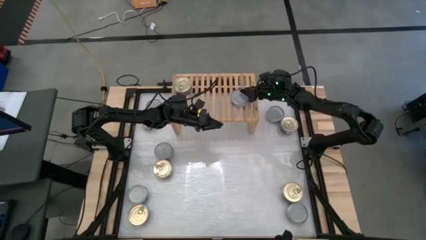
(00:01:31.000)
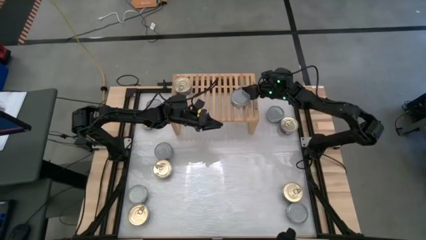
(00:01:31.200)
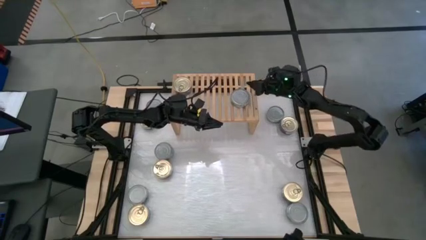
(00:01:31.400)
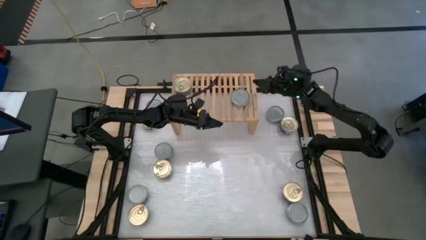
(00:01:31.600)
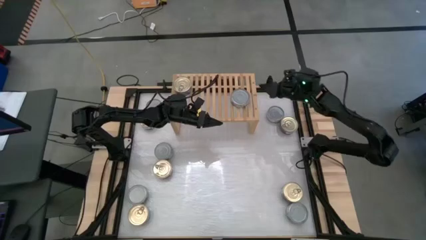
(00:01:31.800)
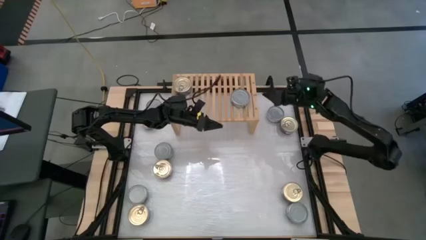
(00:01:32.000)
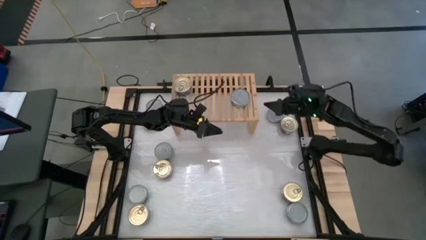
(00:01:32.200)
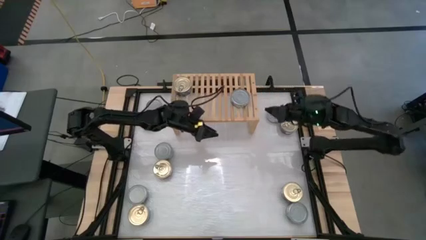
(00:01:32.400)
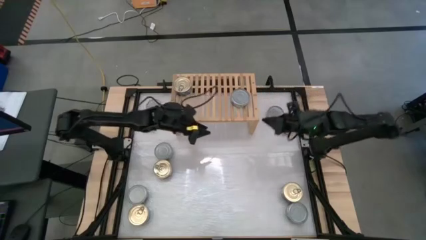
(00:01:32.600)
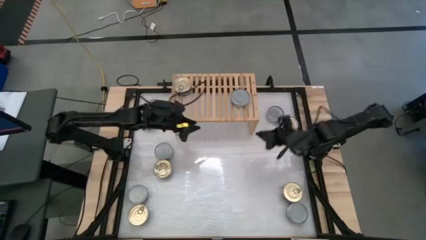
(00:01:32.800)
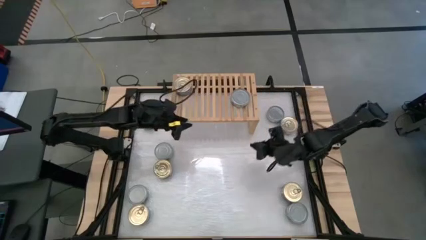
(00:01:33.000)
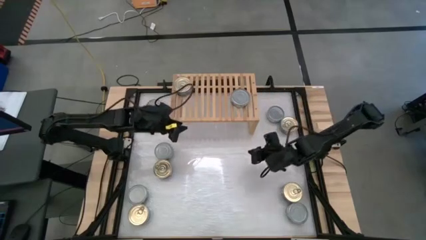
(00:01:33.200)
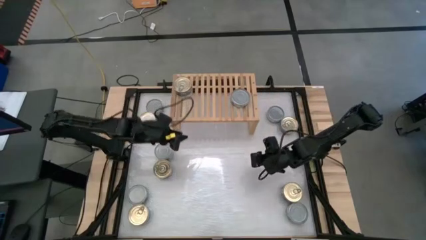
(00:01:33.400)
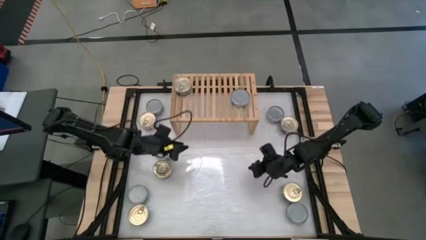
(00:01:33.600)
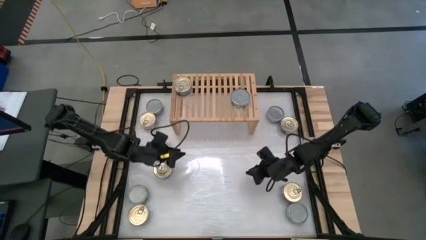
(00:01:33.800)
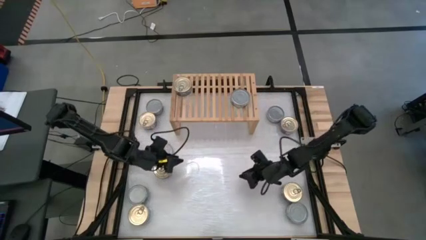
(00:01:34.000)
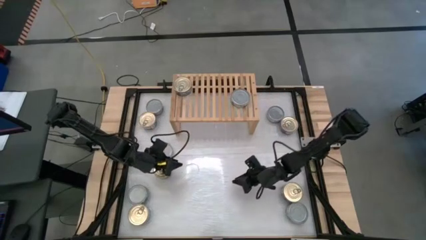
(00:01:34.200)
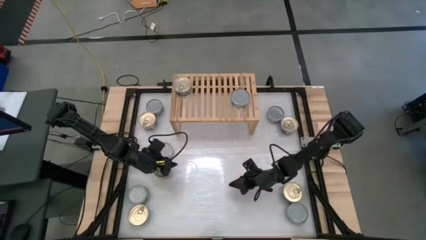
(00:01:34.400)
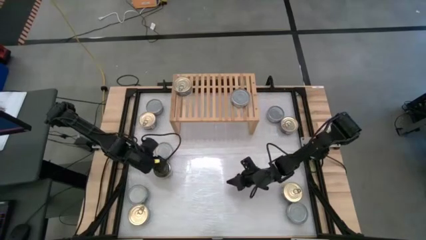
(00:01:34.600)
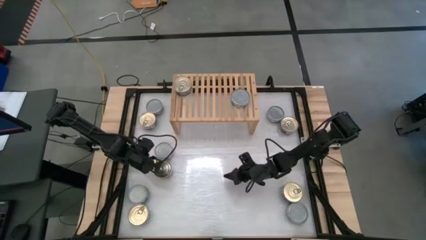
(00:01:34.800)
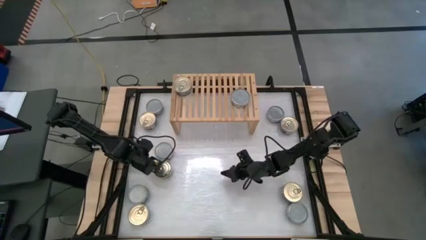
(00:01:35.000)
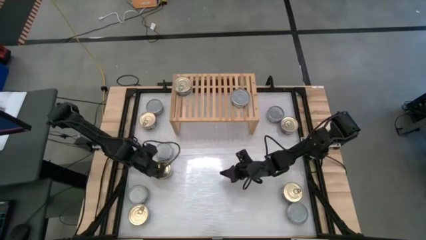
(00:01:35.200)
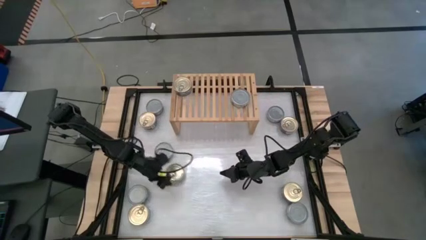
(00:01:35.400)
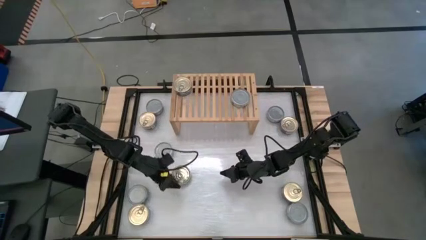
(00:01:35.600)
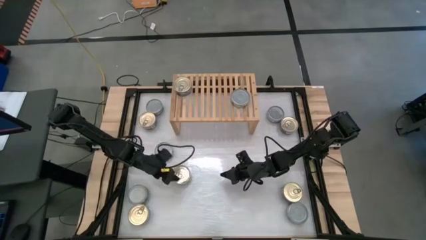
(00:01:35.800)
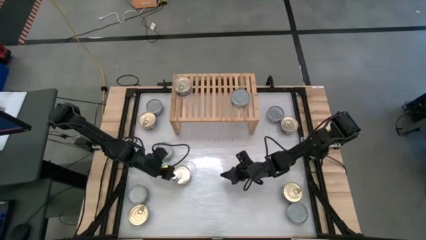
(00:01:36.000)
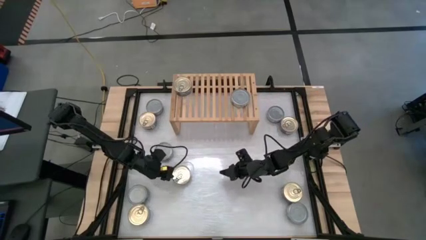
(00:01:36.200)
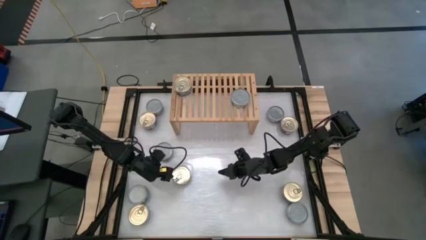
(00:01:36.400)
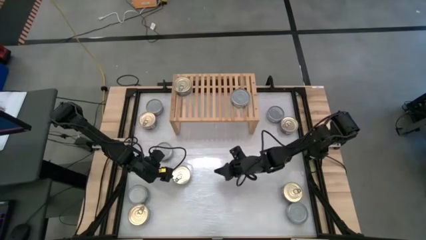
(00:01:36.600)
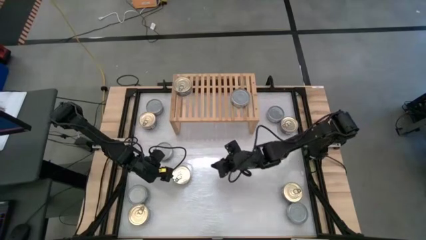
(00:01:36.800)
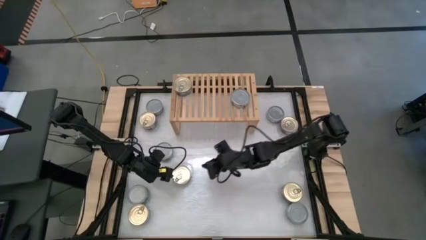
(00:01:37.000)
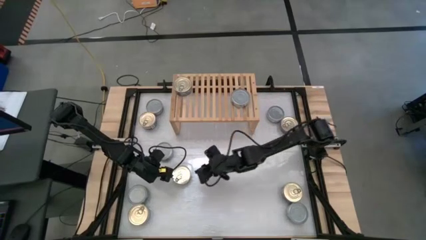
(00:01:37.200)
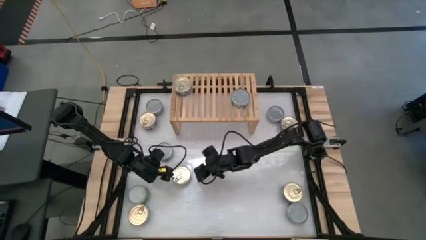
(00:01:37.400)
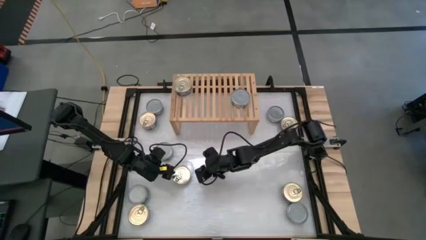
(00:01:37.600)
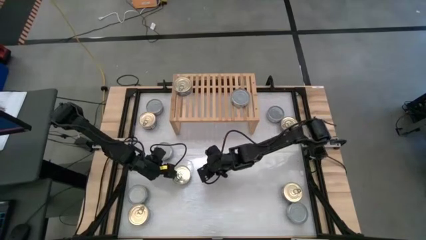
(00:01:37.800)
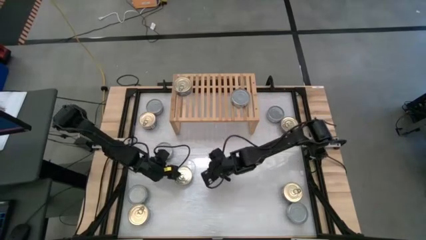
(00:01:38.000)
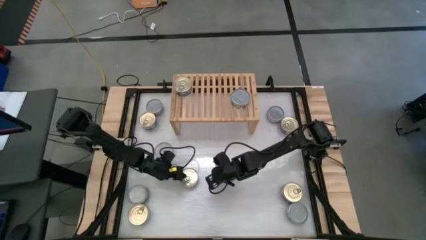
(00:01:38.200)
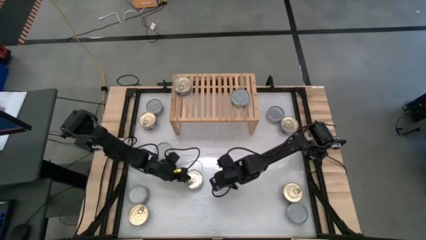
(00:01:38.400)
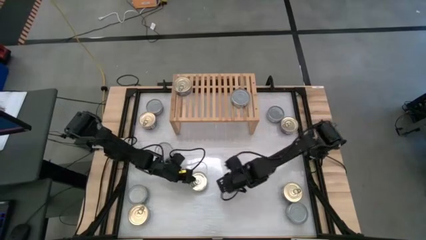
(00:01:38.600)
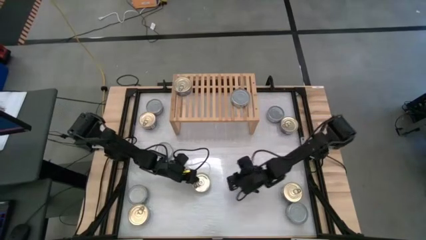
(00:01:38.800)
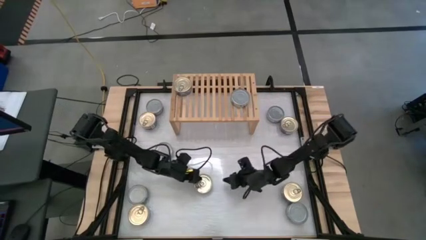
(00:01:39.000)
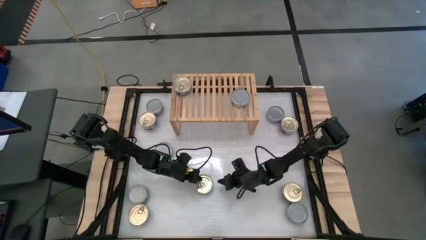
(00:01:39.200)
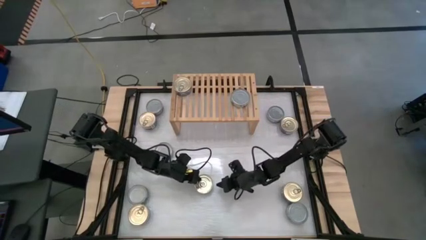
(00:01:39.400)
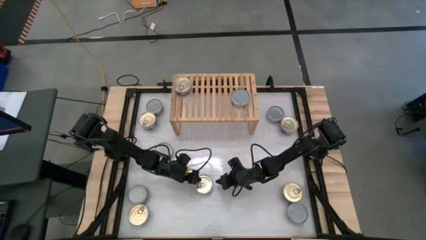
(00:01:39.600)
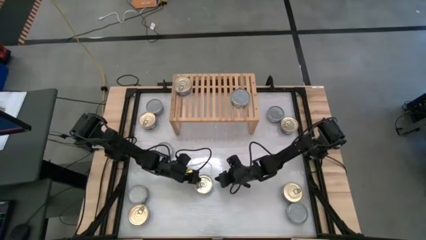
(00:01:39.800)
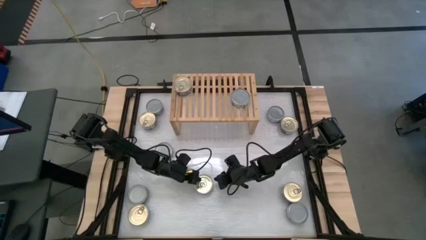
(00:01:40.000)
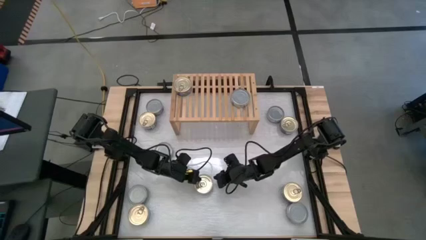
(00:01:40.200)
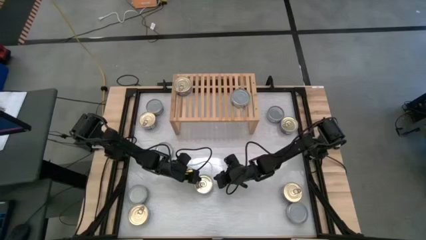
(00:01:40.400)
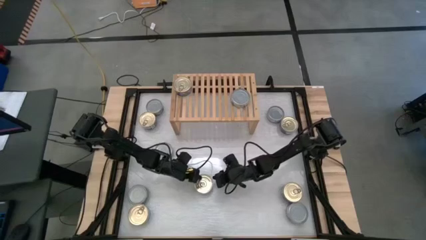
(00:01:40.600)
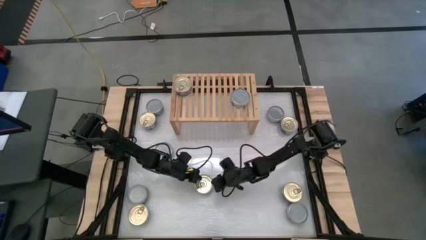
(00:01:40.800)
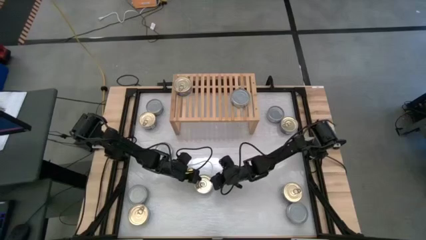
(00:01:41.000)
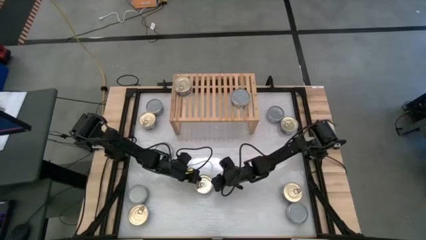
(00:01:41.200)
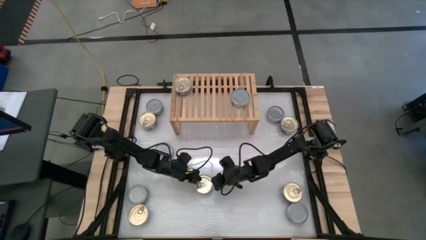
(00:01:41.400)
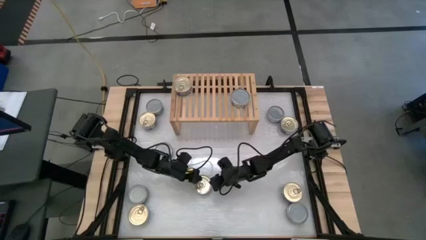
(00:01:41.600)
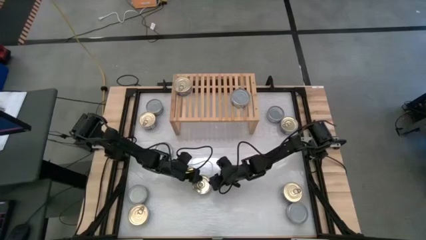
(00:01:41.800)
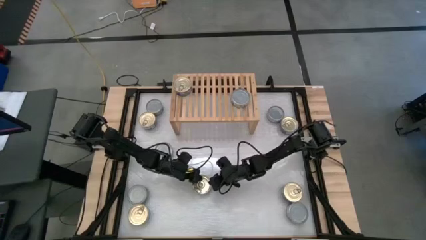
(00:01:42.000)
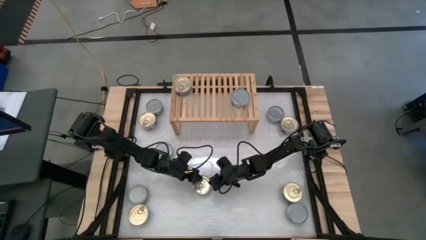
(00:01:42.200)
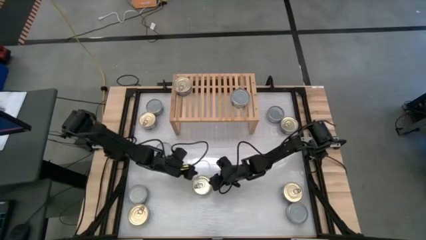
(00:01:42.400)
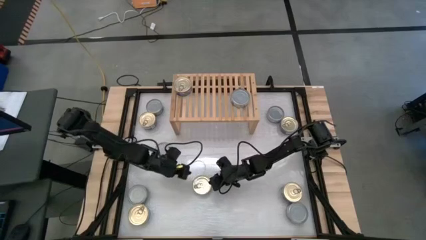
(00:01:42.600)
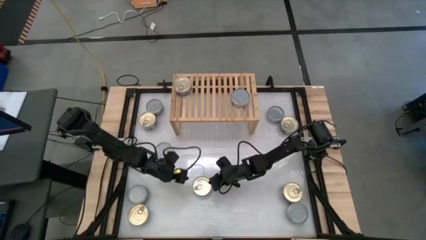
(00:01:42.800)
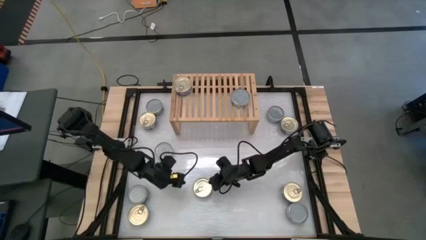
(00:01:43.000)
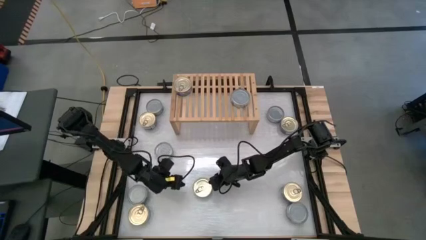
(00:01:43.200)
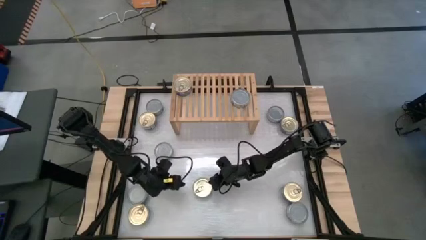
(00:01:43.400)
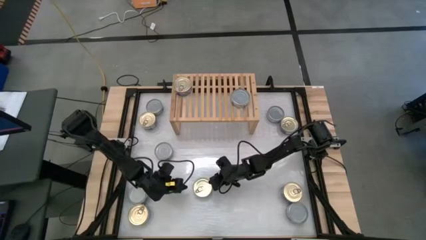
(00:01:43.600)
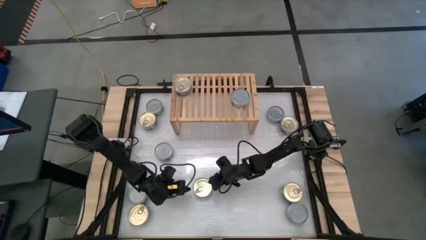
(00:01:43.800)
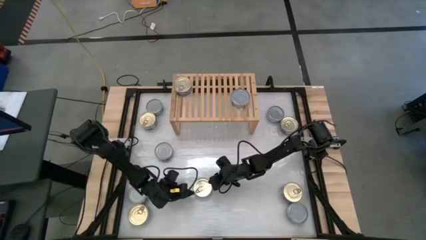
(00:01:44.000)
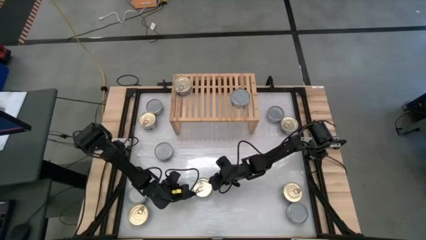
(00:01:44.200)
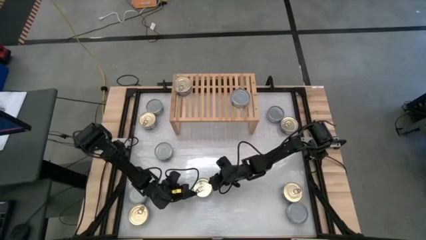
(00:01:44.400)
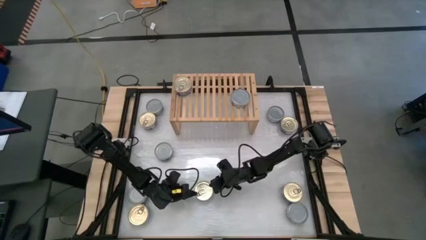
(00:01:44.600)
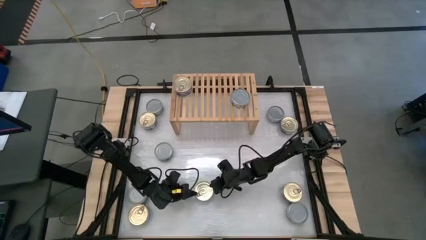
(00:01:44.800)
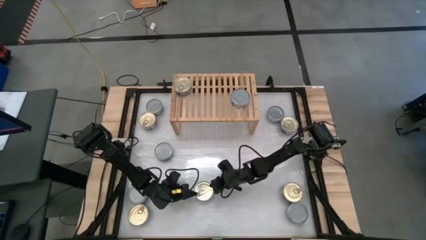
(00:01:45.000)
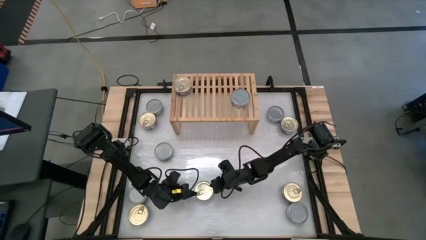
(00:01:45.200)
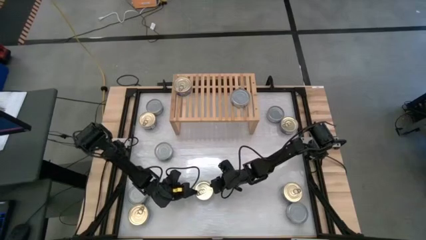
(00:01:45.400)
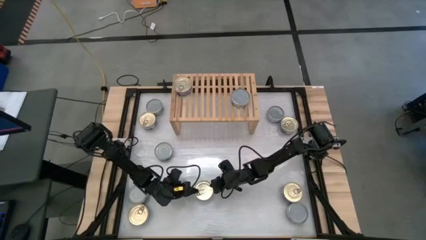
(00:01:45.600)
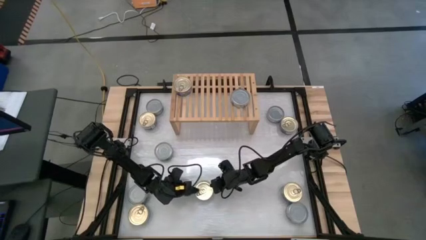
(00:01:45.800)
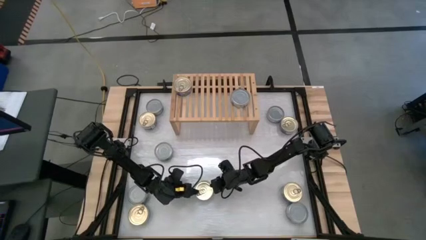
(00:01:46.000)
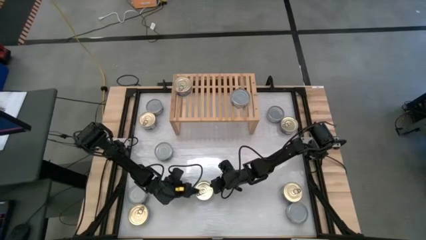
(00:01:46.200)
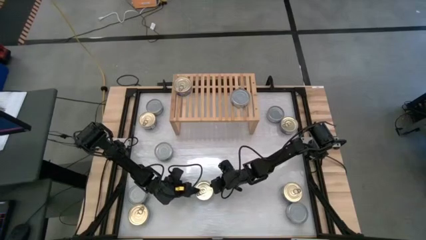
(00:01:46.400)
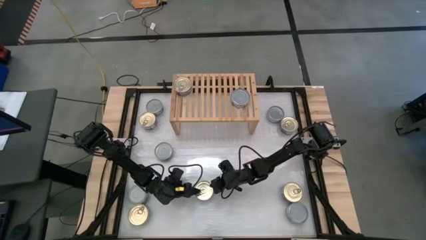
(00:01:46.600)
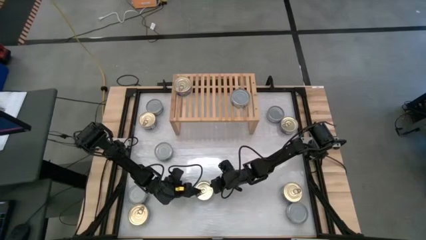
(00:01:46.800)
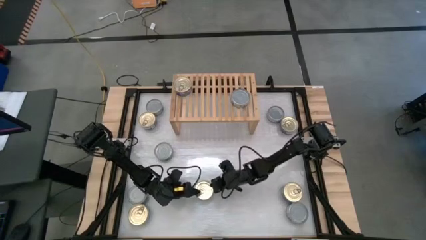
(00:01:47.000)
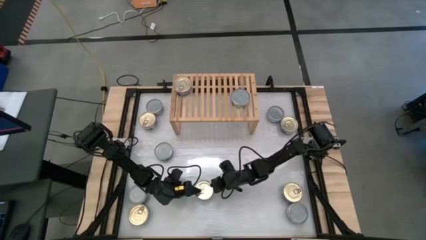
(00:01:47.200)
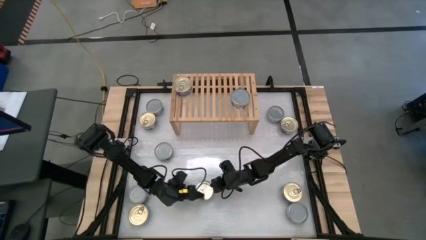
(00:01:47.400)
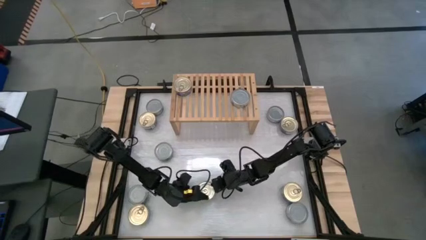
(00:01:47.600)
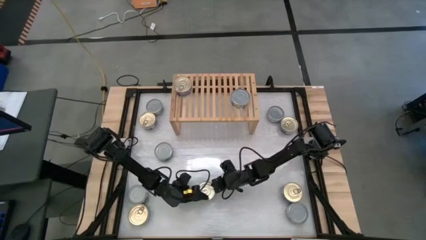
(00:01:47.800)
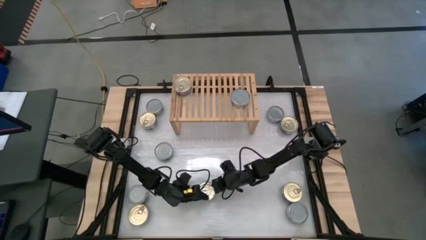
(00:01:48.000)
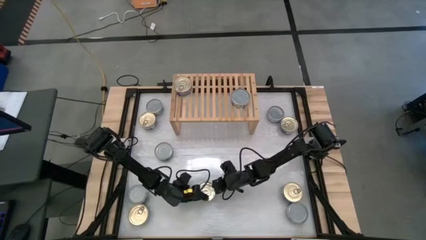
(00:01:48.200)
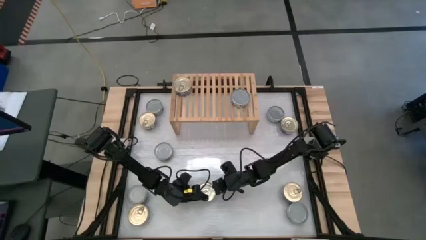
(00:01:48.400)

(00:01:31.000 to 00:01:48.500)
Task: Stack canned seafood by type on shelf
Stack the blue-pink tuna can on top of the other blue-pink tuna can on the shelf
